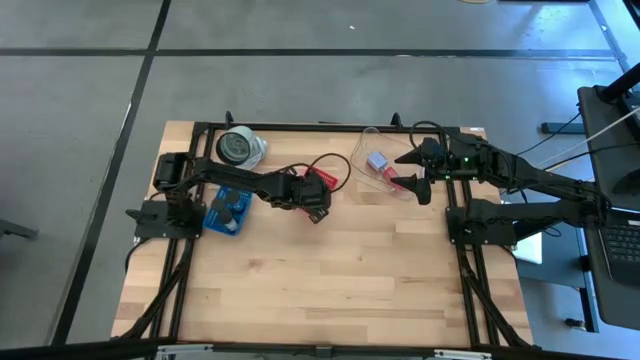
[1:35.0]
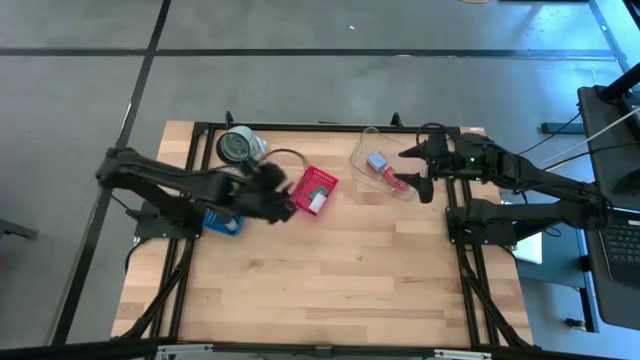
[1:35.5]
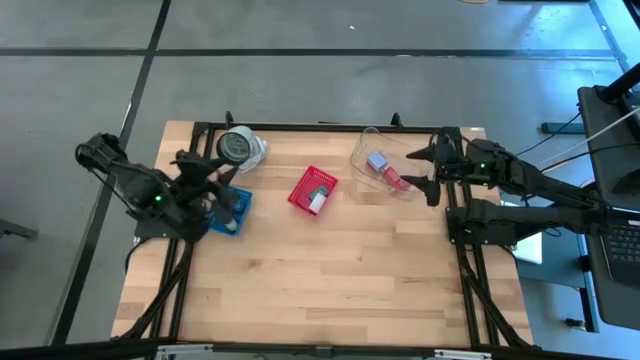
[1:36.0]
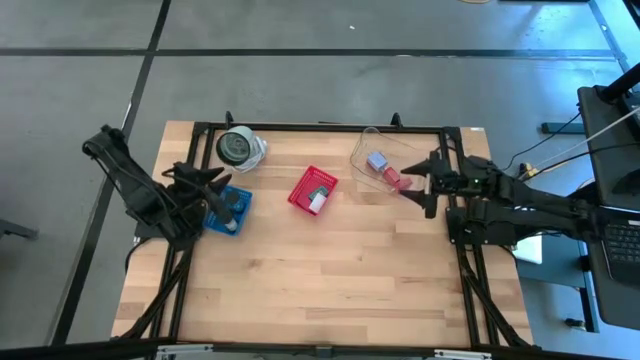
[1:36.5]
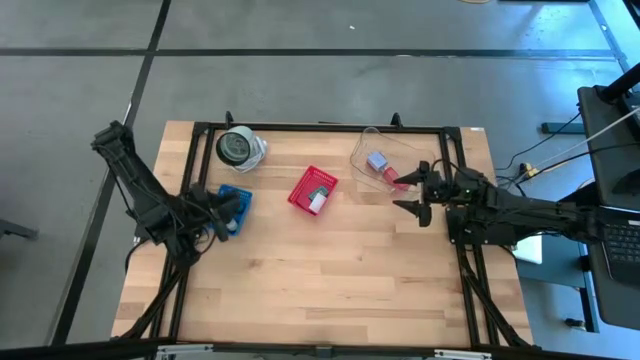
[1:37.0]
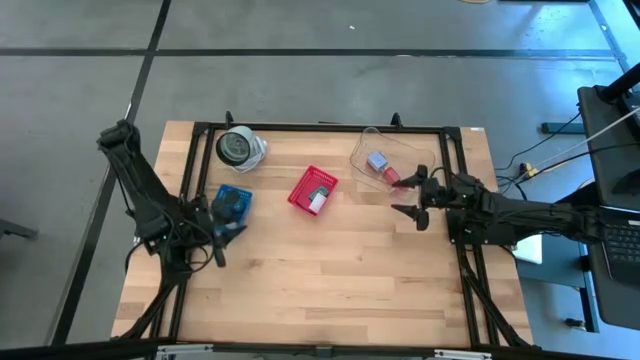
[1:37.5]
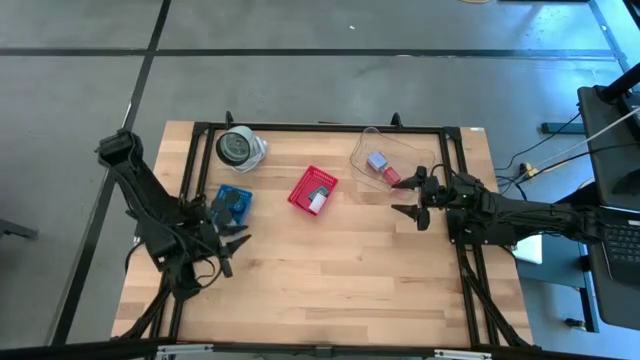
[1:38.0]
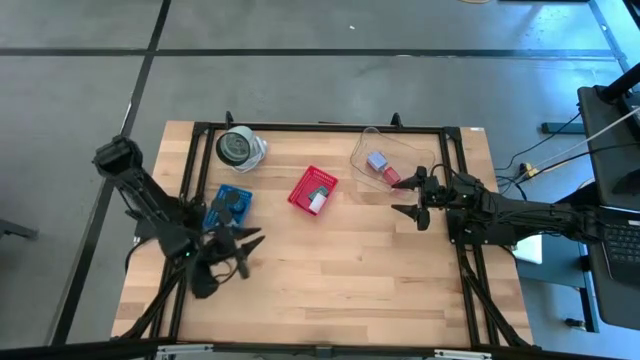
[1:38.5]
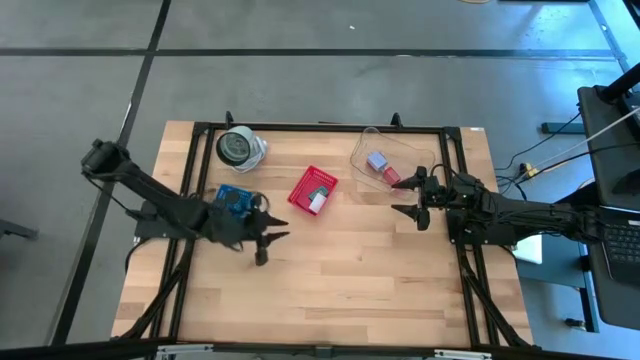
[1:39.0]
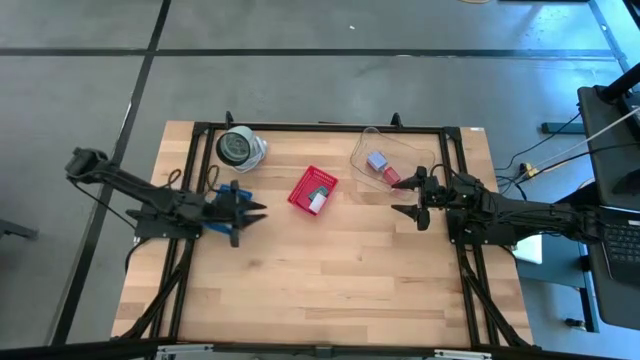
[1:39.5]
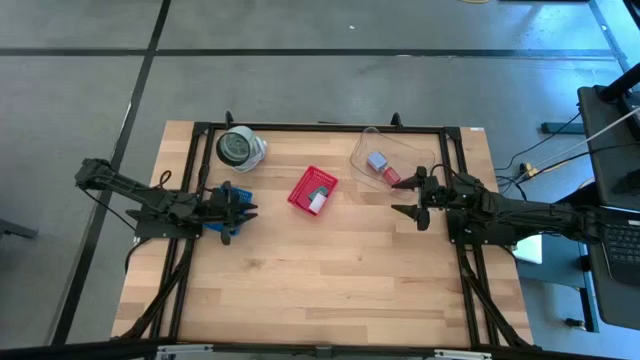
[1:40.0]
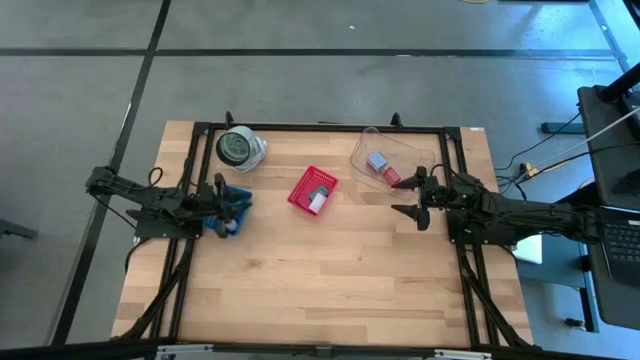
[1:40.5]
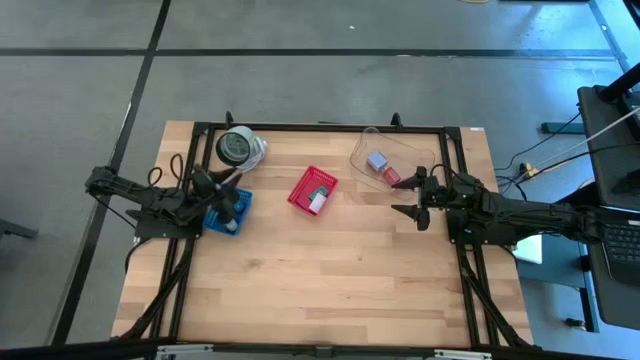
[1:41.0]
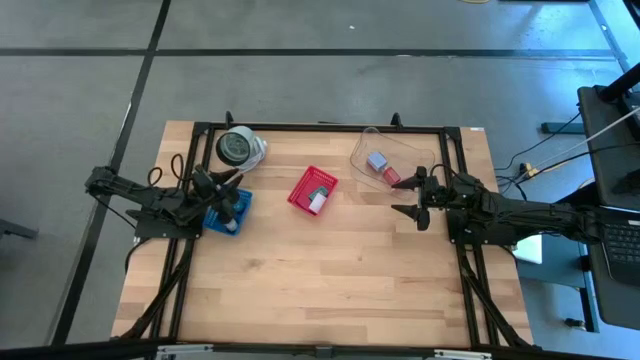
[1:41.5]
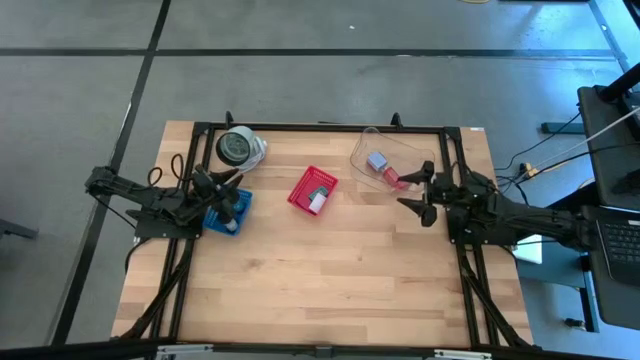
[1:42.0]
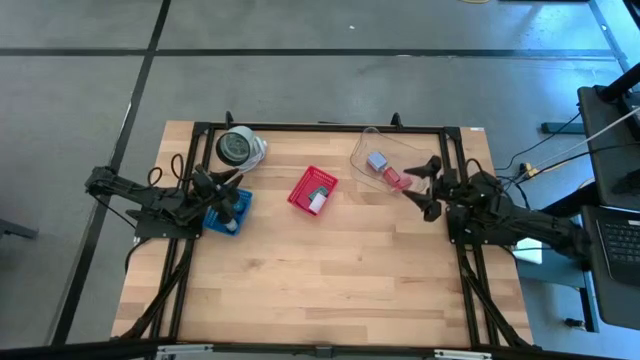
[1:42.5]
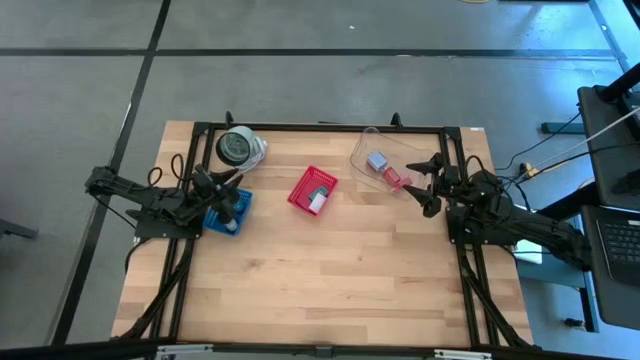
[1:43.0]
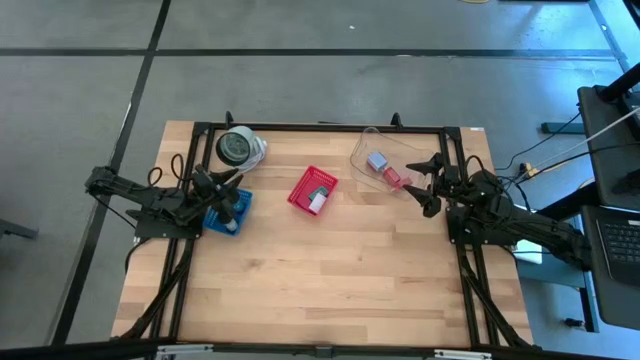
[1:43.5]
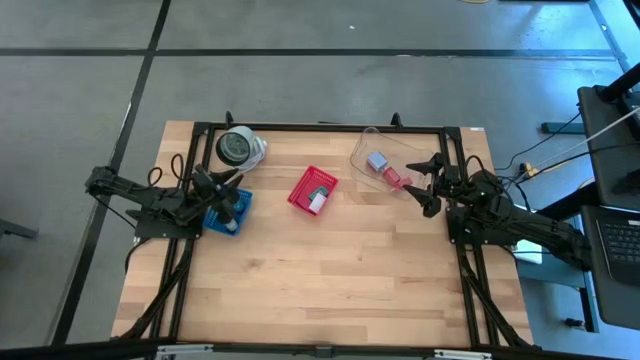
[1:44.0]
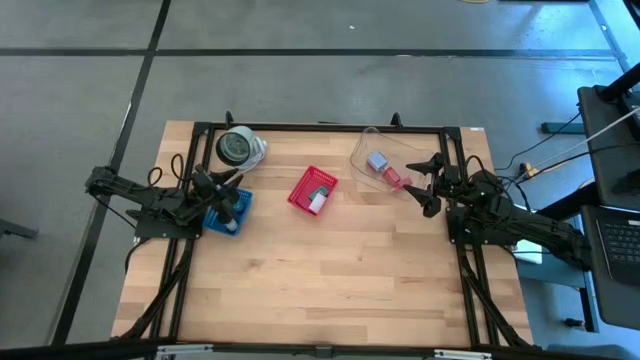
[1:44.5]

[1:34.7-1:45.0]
Task: Pick & Place Office items
Return to Home Position

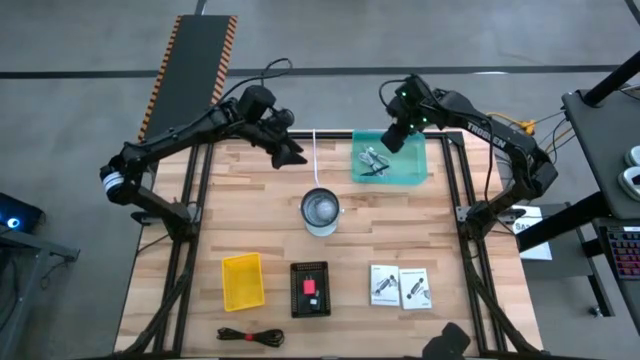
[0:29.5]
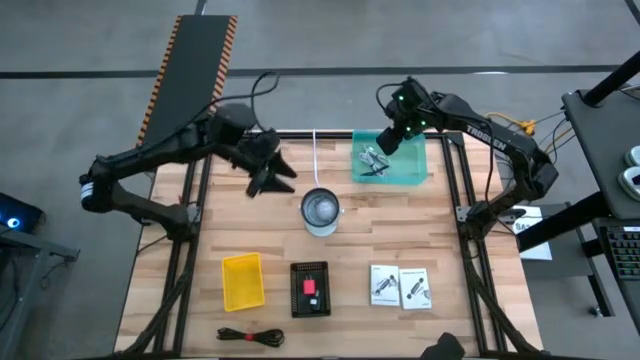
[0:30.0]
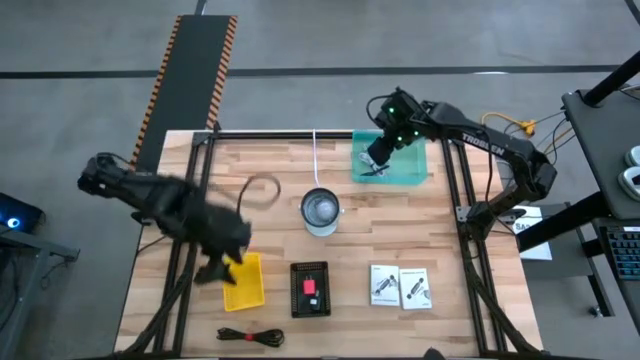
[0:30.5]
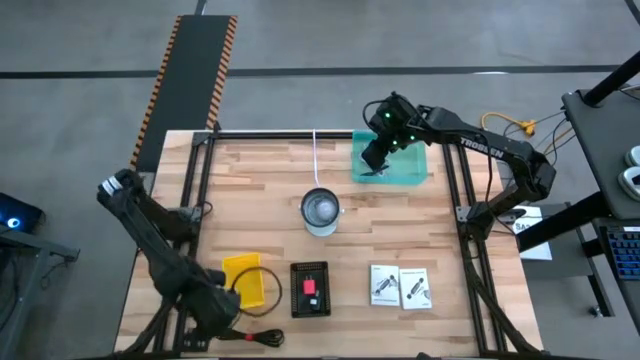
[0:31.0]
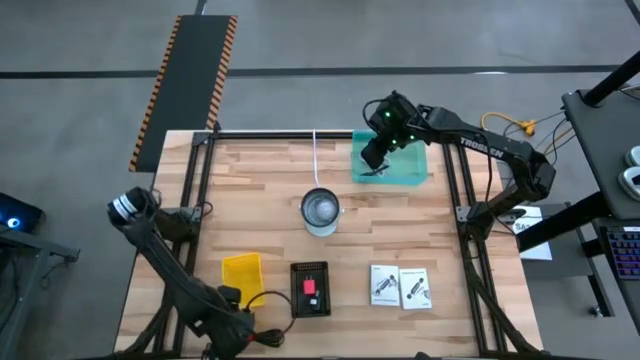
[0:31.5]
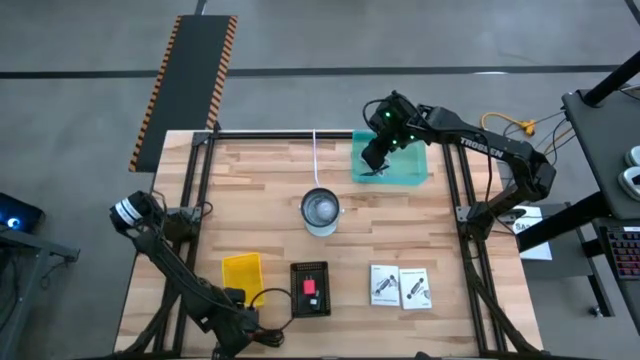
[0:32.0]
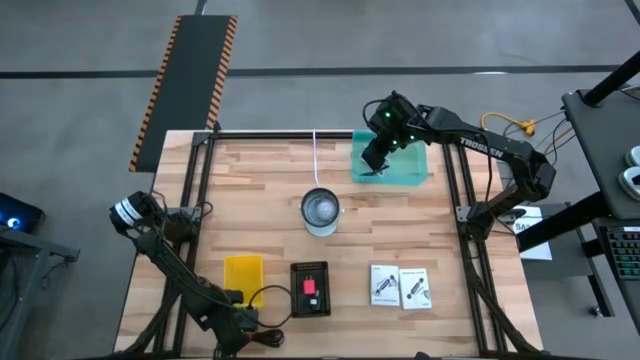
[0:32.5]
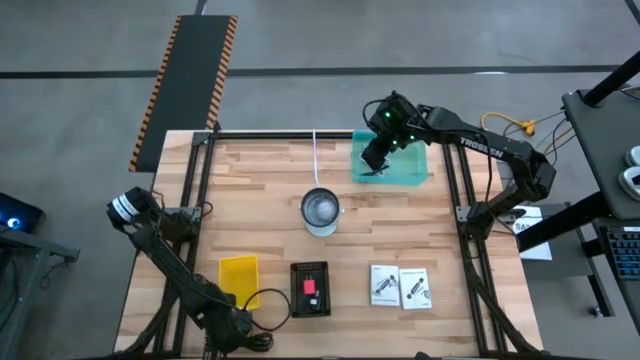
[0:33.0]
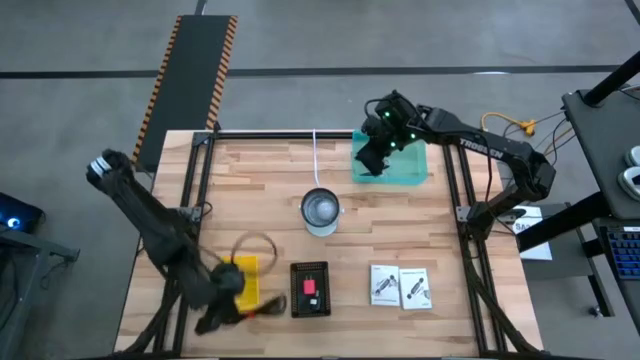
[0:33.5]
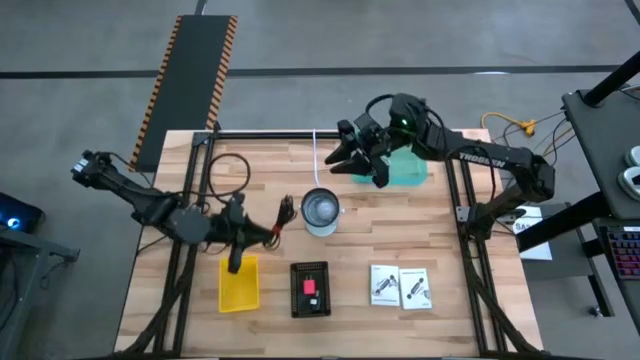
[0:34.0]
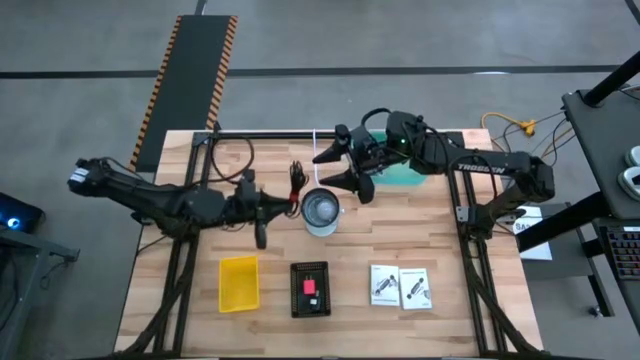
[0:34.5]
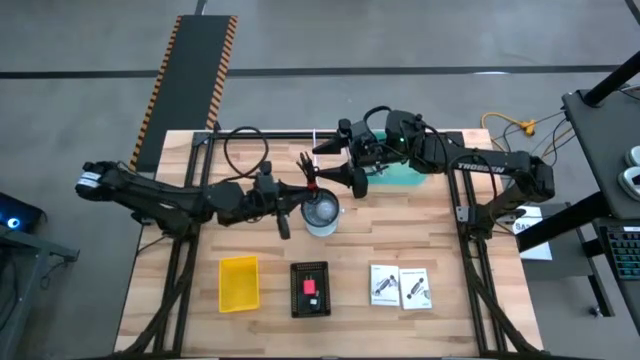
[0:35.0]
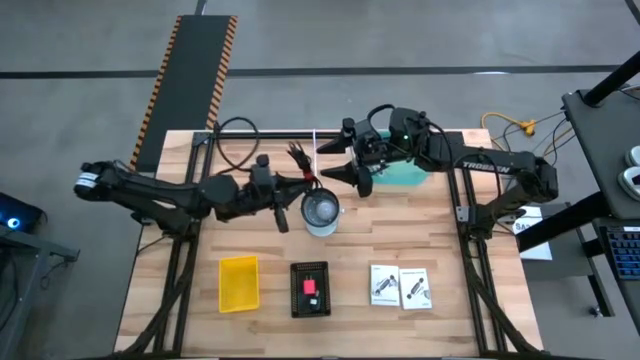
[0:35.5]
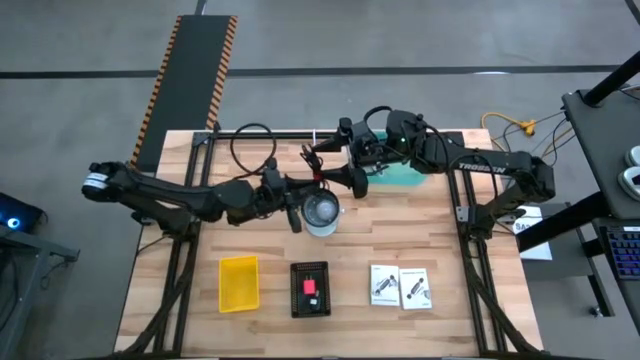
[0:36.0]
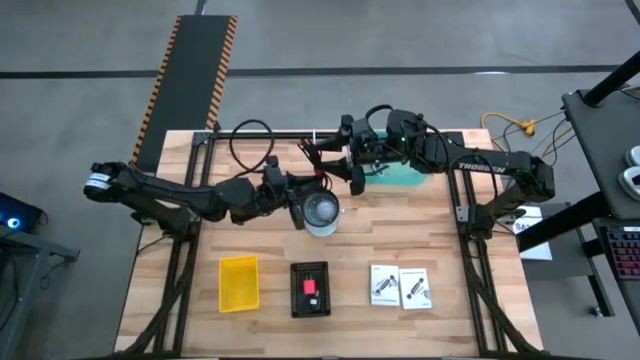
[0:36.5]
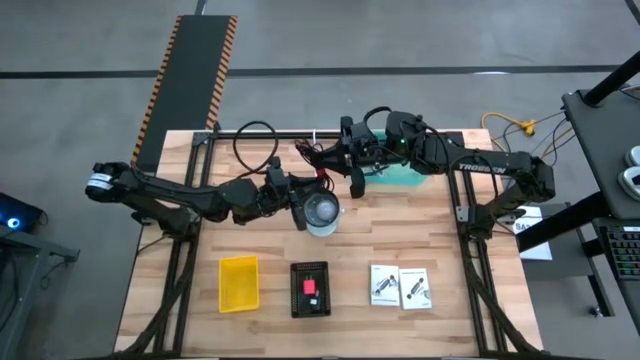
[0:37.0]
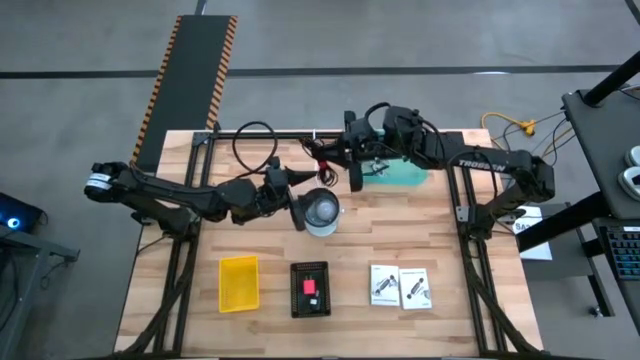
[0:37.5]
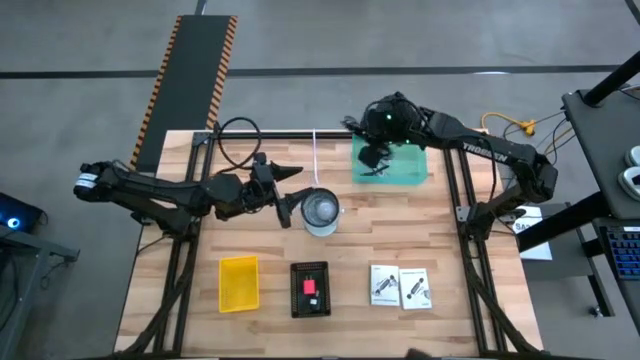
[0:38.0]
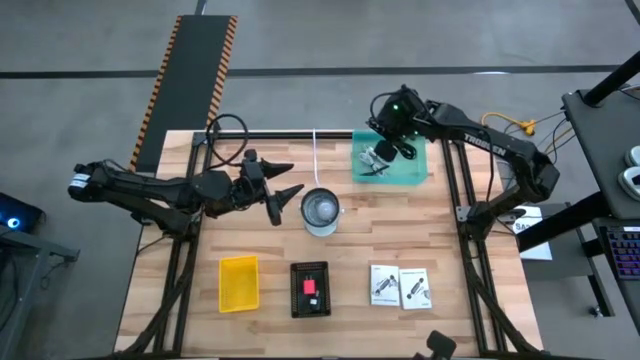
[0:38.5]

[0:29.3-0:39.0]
Task: Pick and place items into bin
Put the black USB cable into the green bin

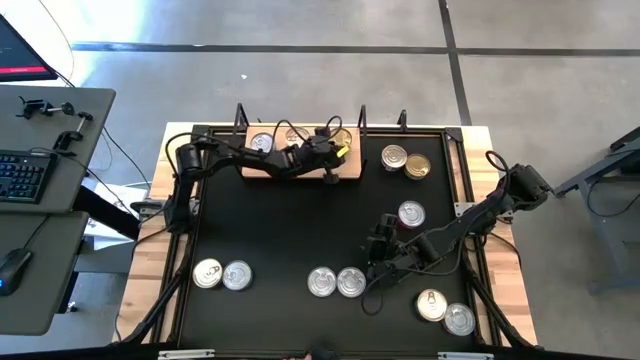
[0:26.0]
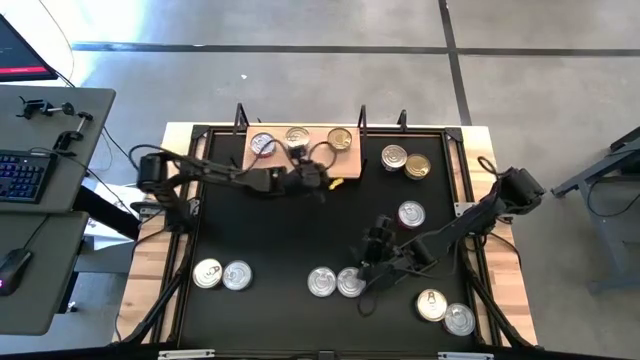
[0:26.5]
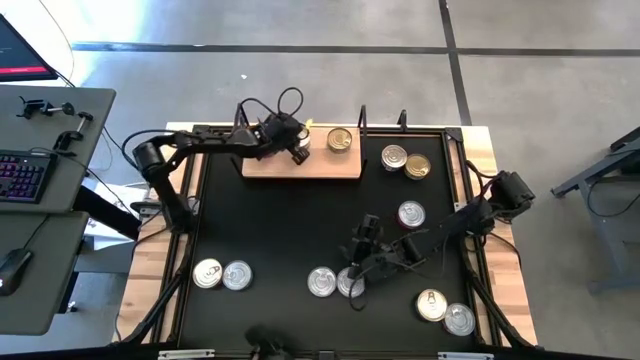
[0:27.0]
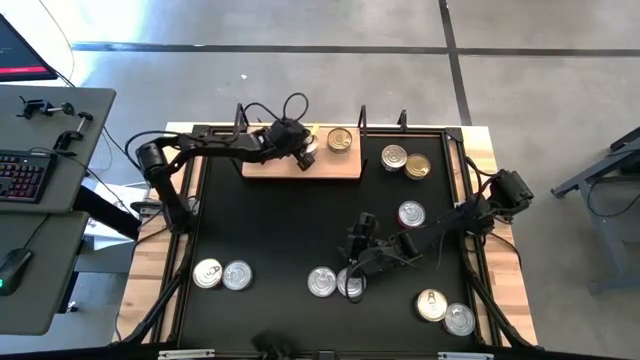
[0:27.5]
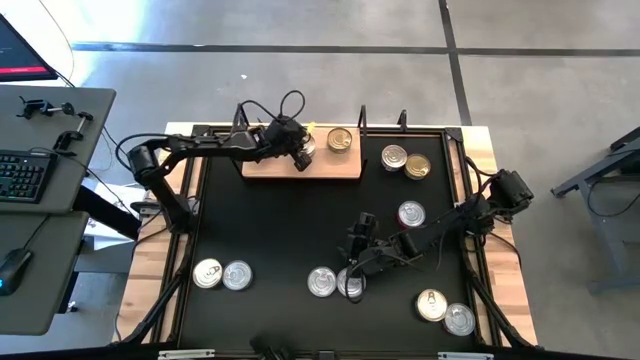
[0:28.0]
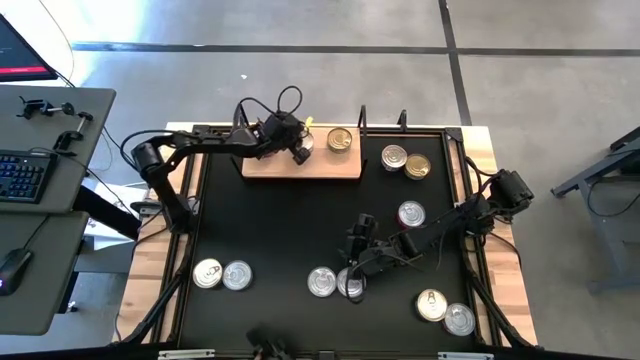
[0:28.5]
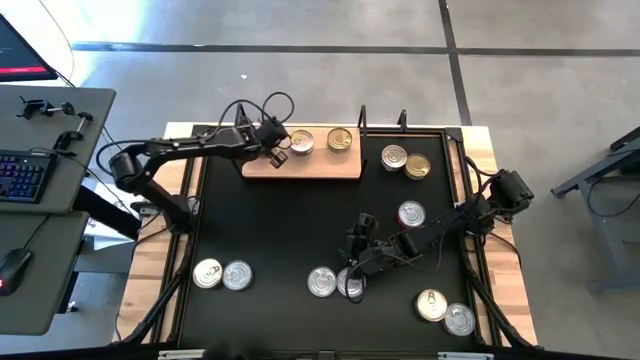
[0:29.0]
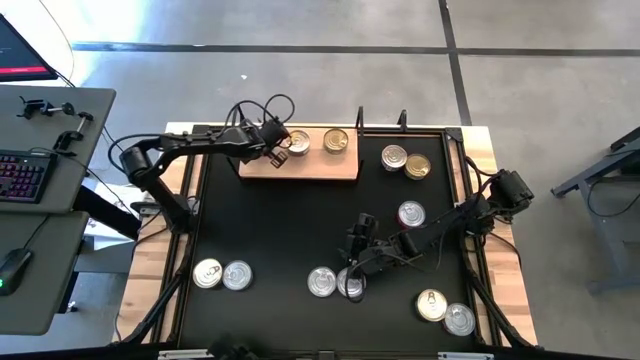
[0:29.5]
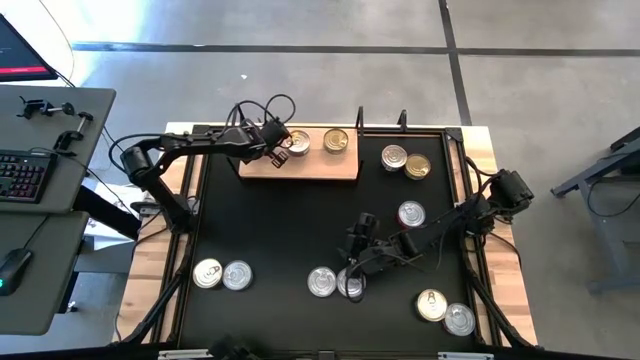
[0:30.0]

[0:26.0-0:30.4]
Task: Stack canned seafood by type on shelf
Adjust the tuna cans on the shelf
